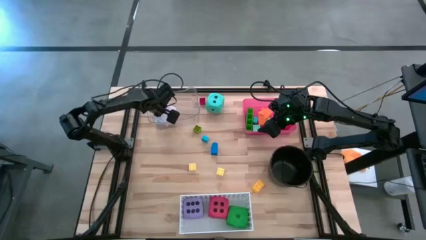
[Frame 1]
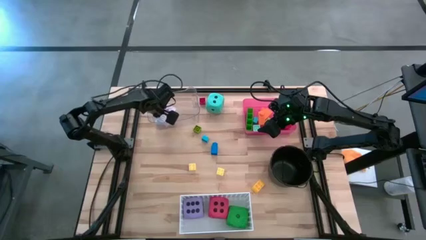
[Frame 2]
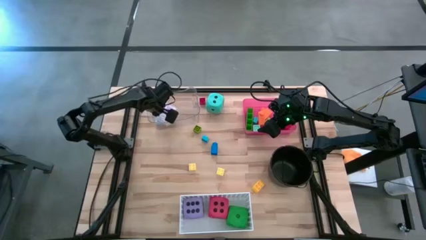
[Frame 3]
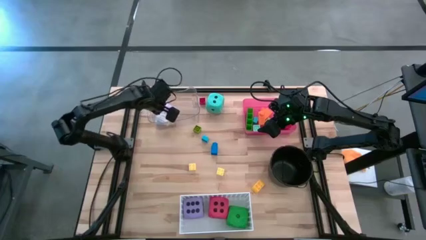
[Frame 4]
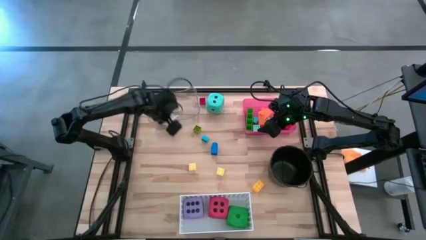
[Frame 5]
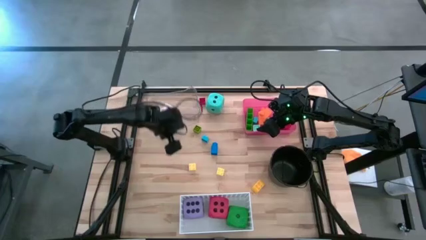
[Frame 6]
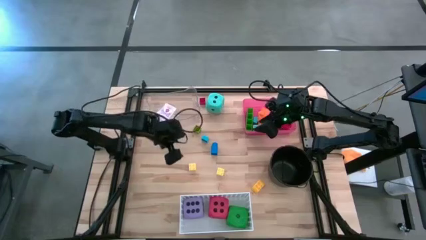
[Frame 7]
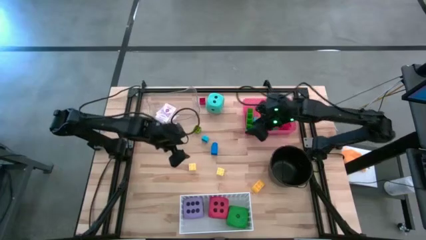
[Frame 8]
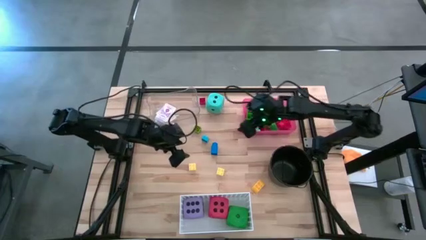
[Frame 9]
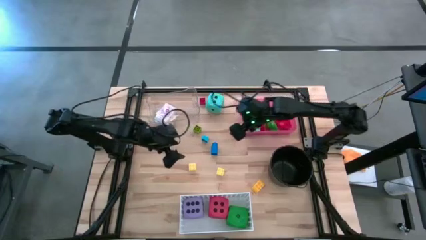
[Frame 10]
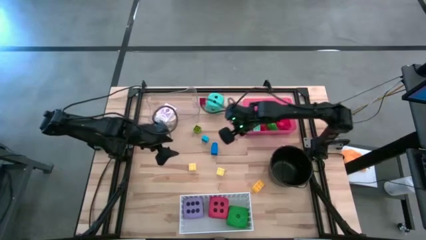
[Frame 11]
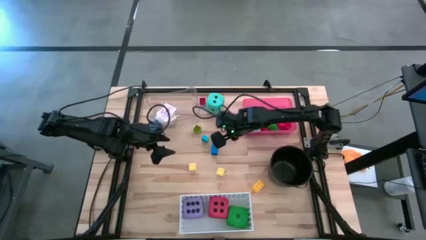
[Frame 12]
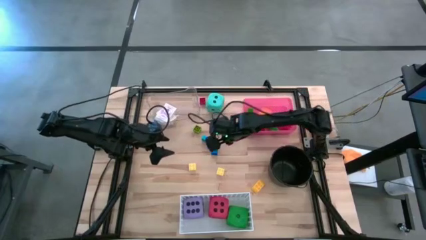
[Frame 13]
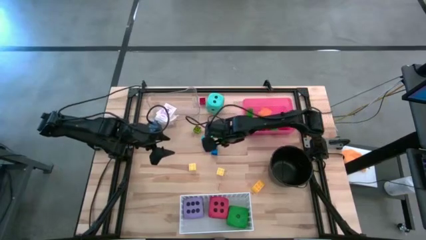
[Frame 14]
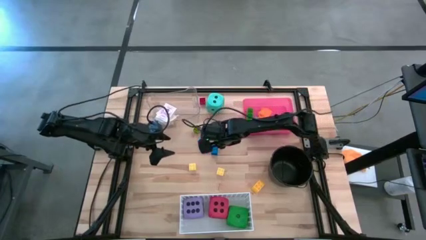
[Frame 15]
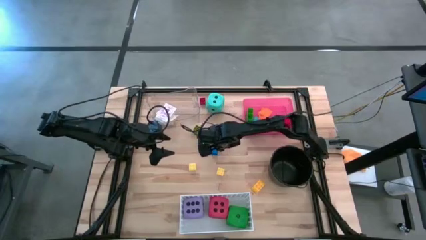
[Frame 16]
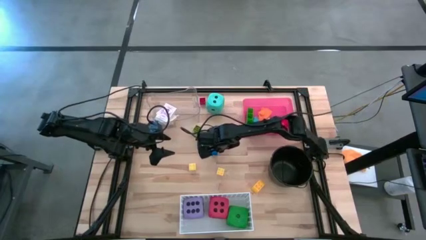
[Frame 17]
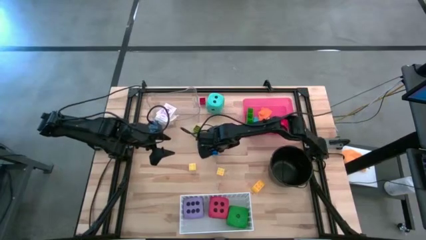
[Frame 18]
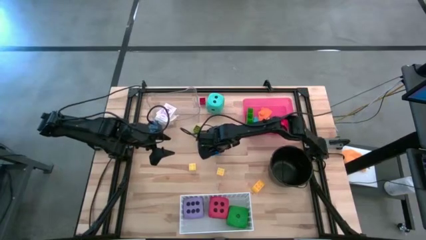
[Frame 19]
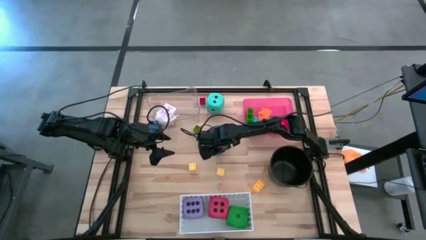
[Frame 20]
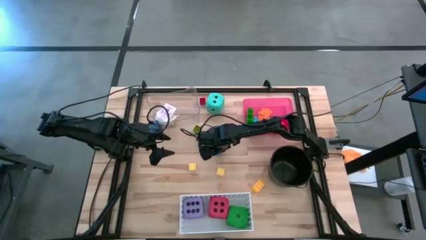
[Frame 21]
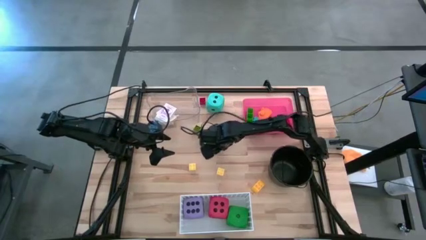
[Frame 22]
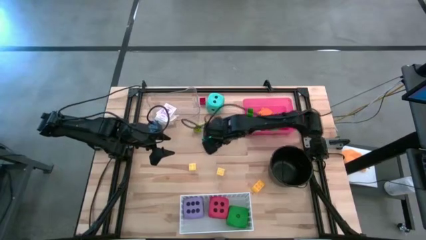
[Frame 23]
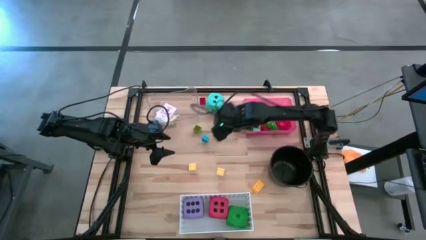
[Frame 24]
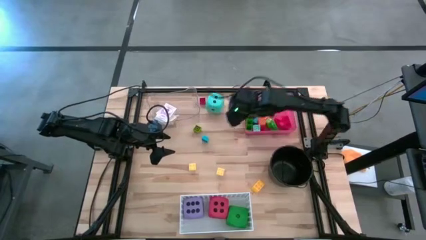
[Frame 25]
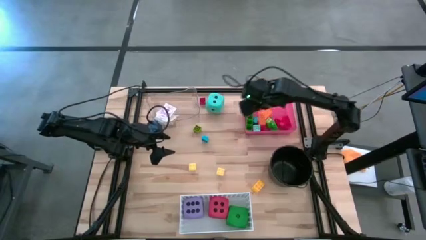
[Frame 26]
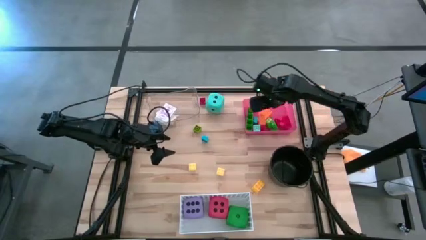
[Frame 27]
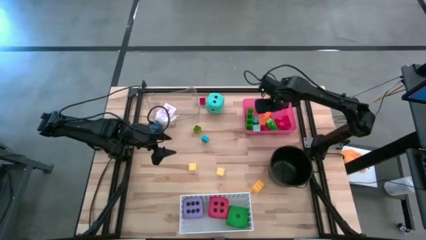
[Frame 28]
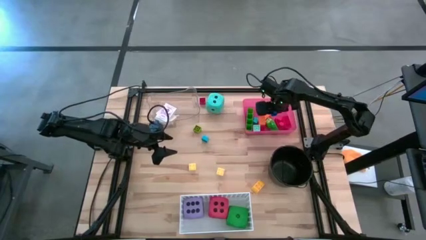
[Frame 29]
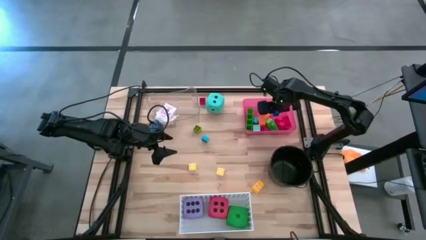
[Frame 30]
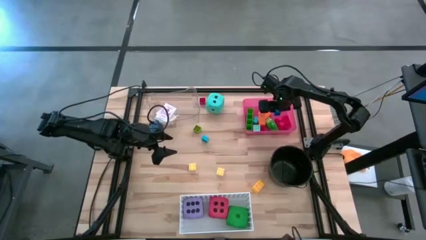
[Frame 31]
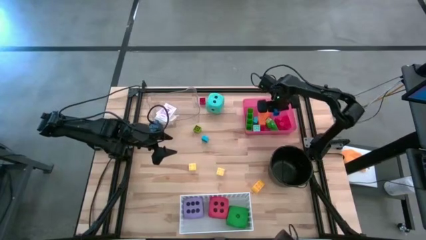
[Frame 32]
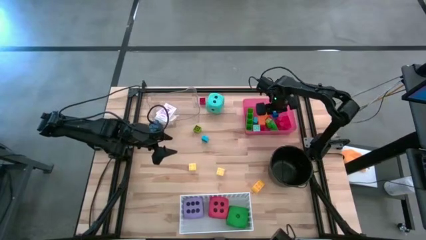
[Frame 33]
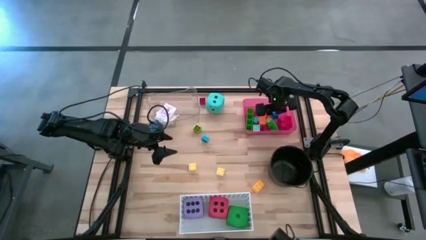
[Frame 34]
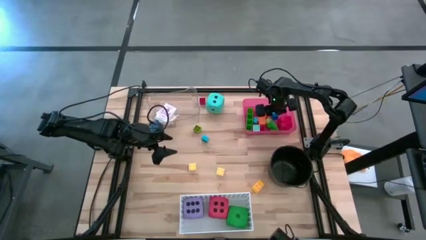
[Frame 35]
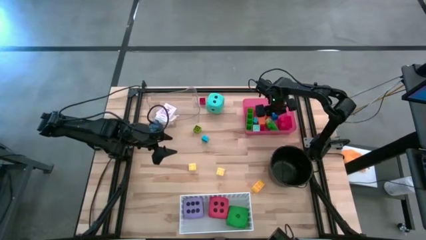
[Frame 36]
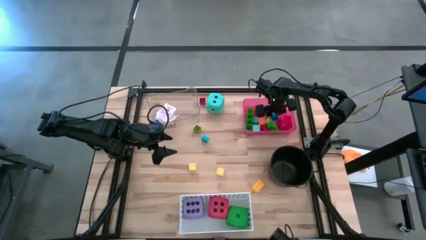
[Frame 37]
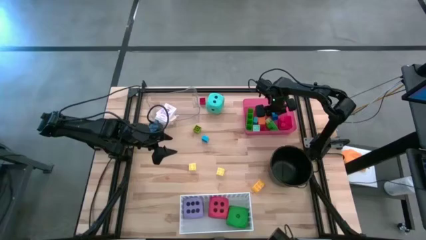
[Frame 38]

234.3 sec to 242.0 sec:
Task: Pick & Place Toys
Put the blue game piece into the red bin

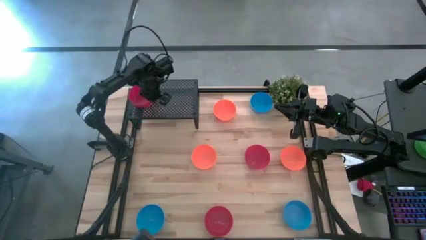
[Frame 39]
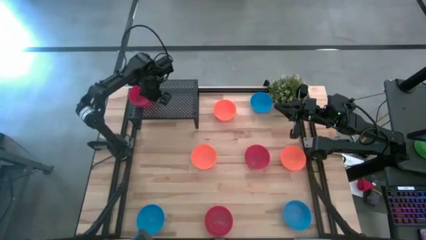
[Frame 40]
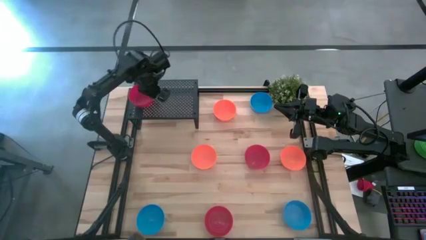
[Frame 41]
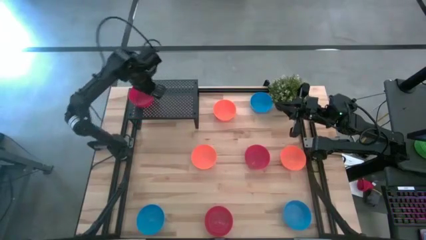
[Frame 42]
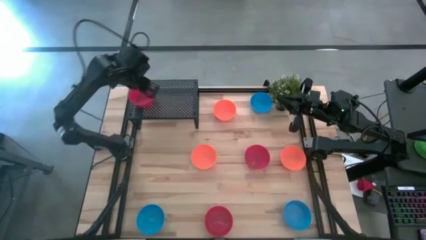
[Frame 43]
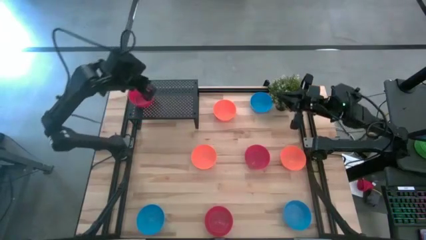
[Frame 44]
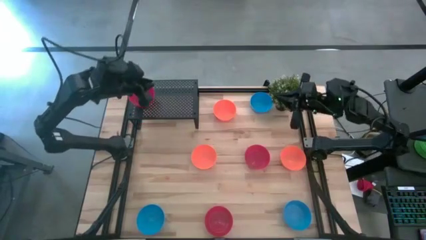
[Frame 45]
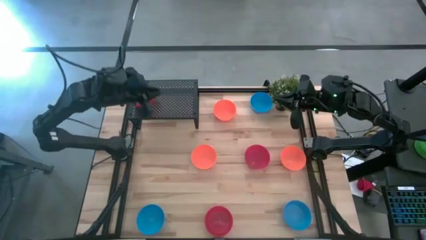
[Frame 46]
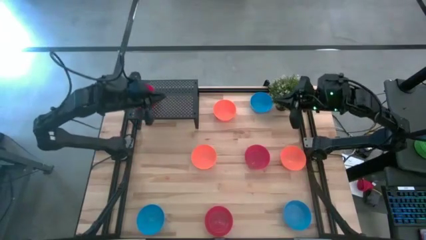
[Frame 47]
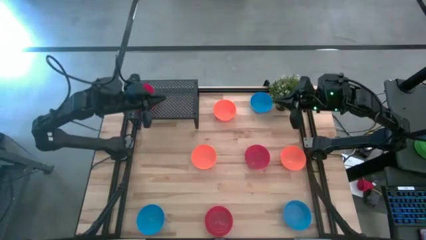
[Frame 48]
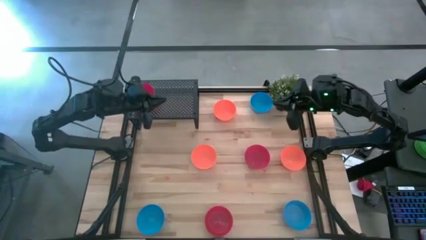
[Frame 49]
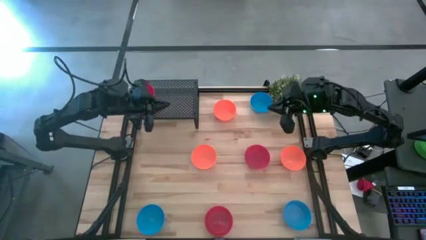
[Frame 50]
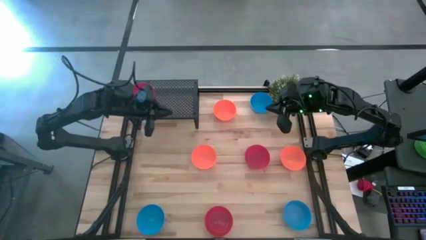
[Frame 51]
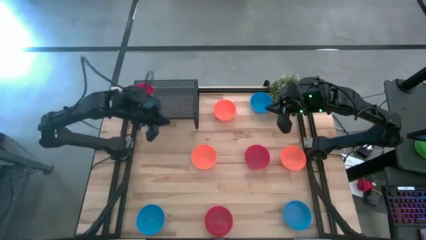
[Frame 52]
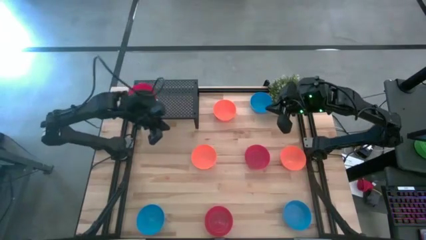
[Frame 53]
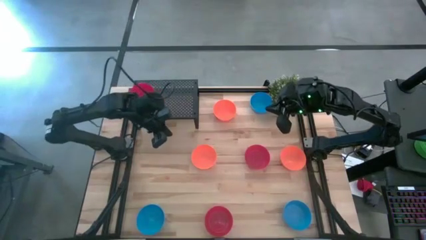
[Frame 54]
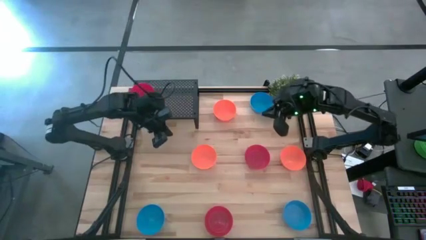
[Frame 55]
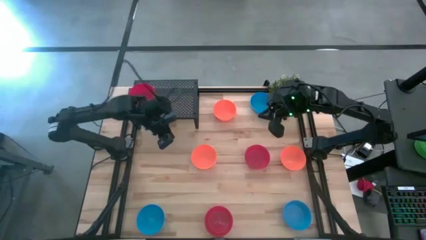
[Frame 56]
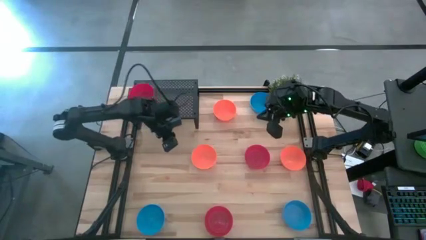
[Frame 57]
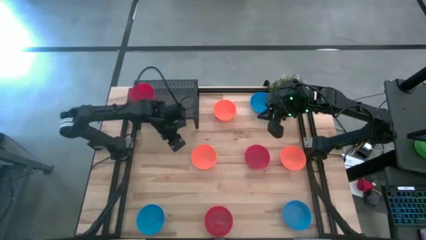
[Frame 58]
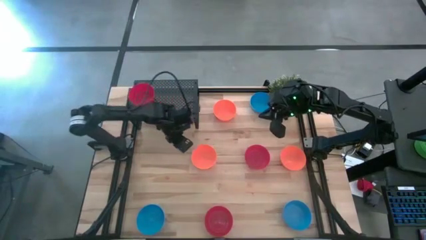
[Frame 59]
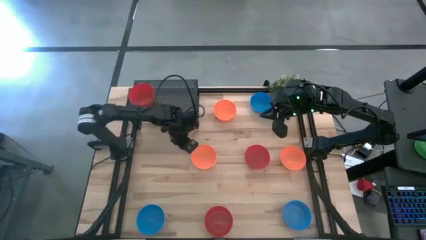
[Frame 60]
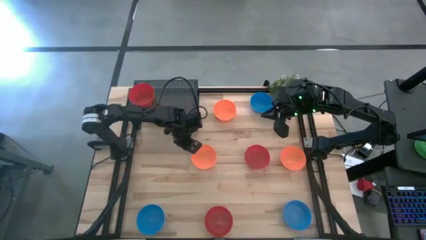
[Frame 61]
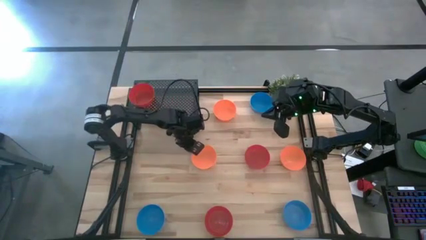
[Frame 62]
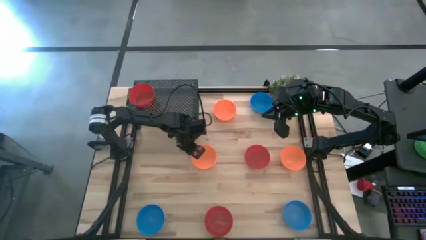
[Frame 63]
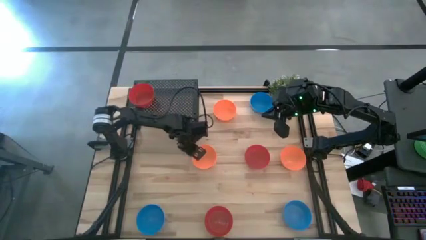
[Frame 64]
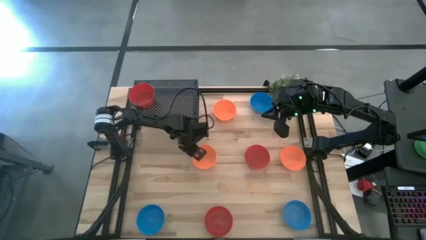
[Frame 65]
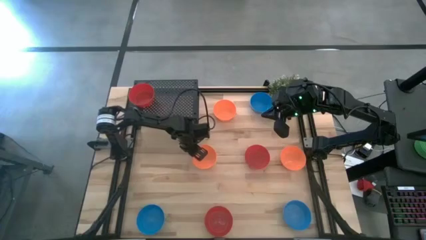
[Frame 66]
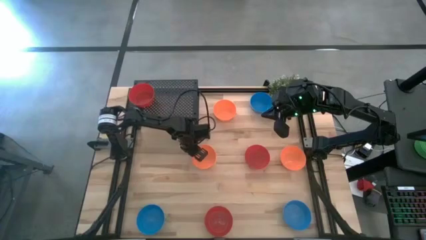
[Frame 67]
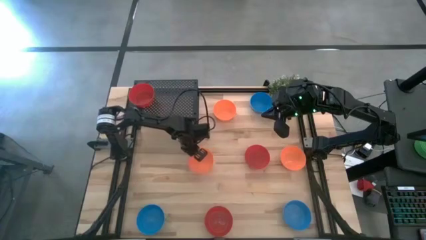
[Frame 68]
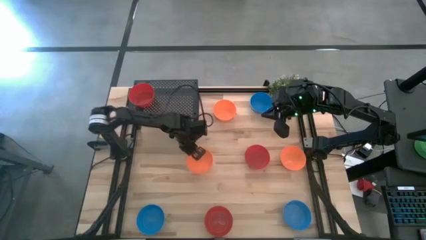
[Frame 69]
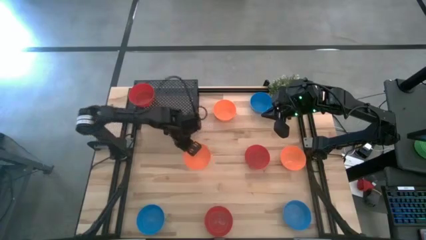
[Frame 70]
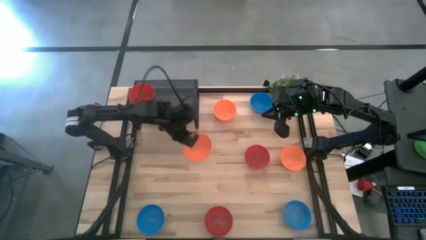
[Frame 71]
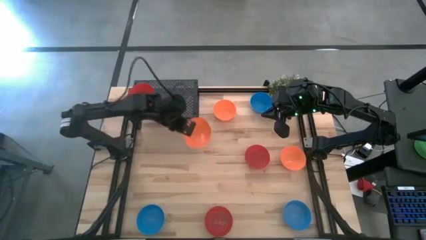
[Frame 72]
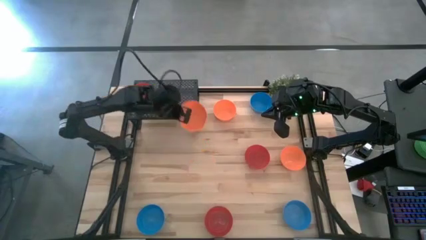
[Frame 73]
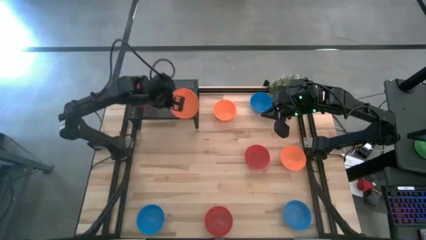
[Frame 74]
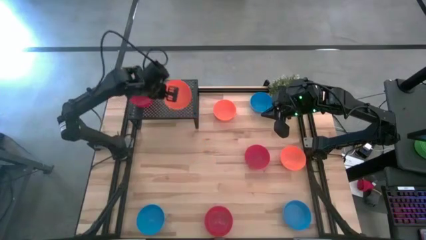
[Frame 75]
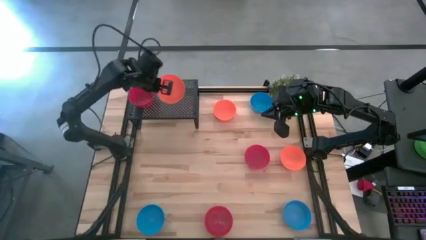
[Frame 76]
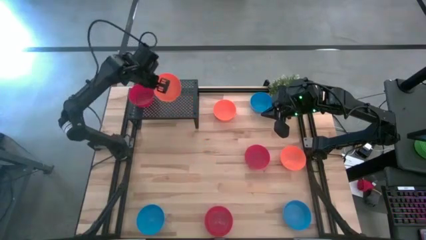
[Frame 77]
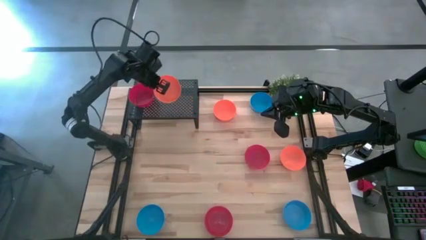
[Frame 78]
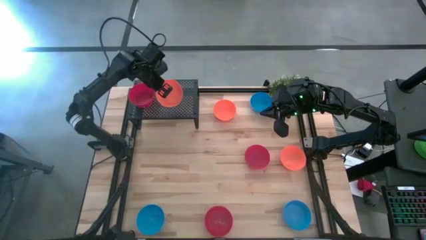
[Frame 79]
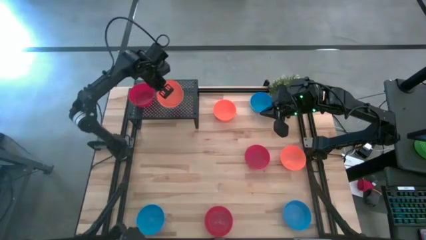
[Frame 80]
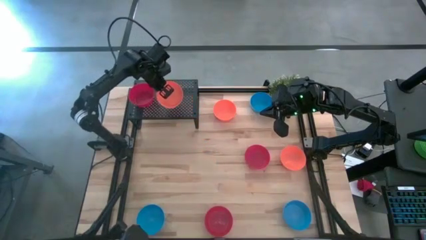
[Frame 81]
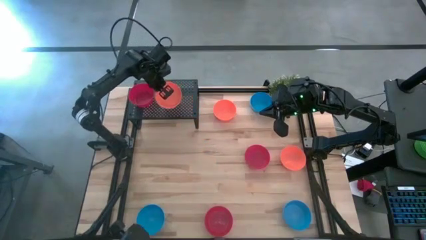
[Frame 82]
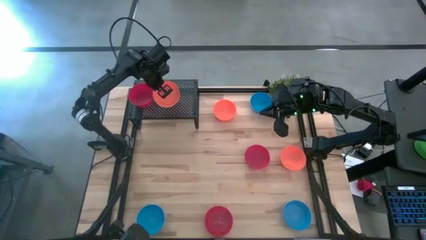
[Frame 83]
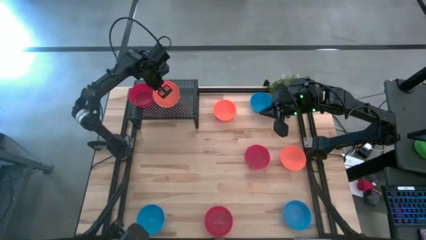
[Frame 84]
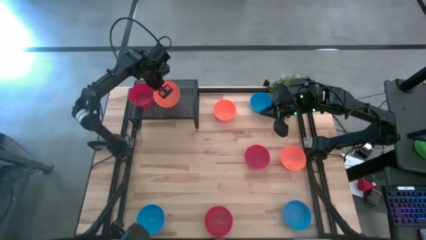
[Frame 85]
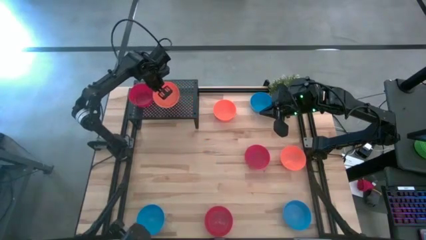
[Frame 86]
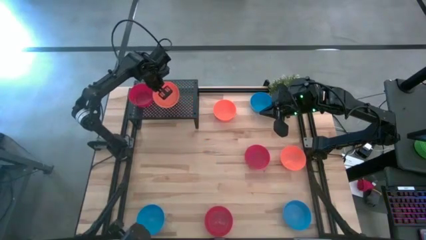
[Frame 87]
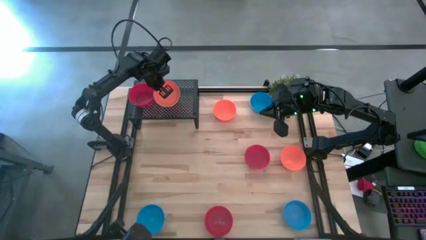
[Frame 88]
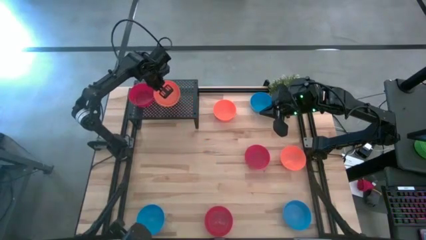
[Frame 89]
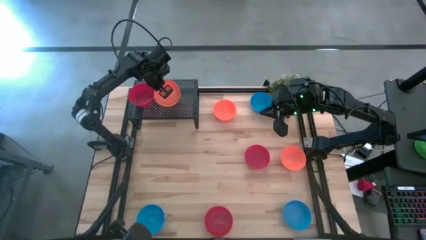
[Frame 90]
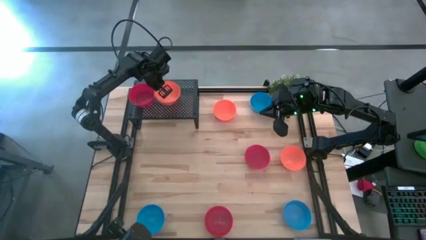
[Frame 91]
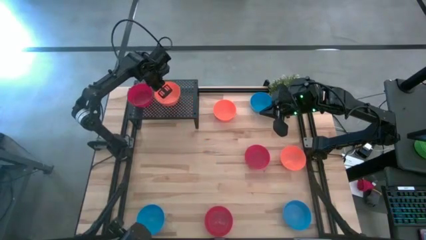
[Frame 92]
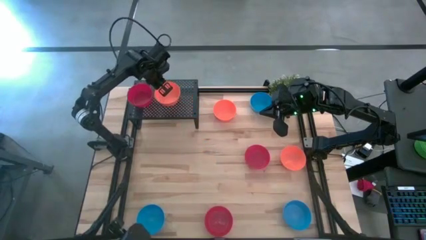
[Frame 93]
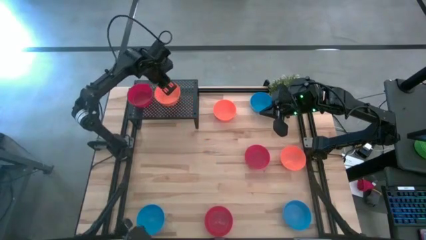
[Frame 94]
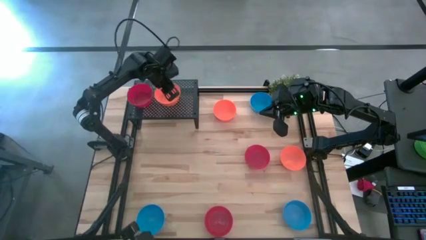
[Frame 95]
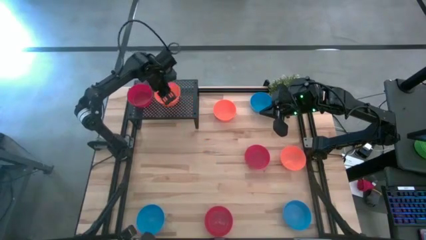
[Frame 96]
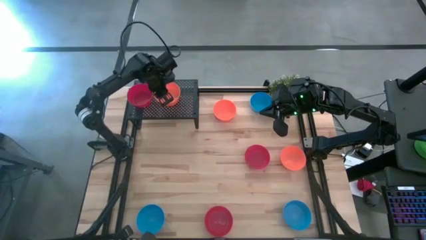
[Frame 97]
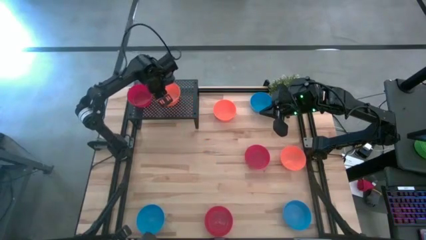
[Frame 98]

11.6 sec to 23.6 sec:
Task: Pick & Place Mini bowls
Put the bottom left orange bowl on the shelf
